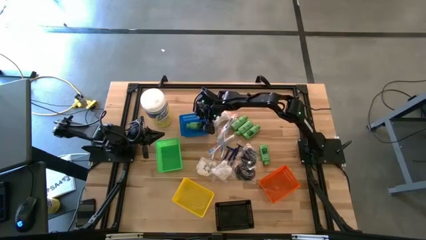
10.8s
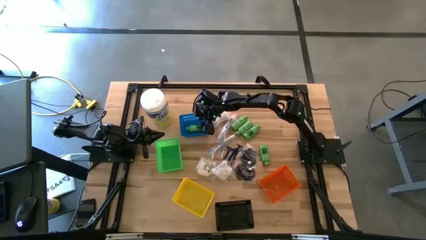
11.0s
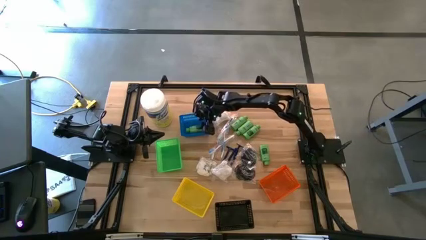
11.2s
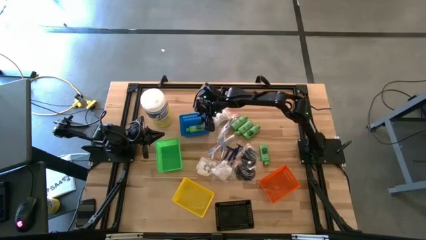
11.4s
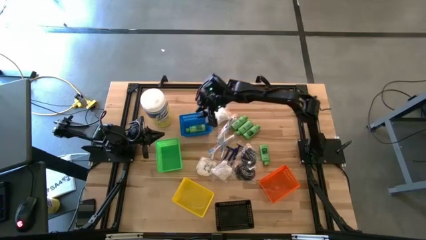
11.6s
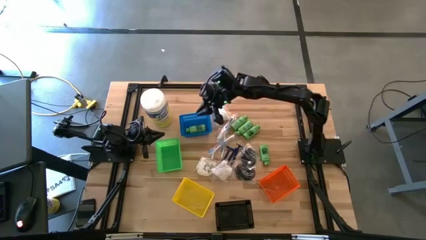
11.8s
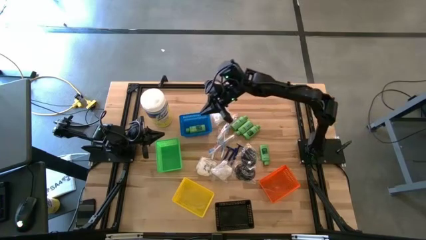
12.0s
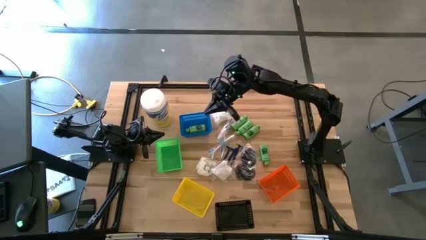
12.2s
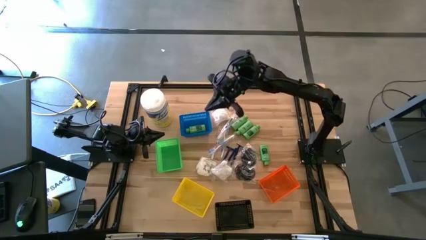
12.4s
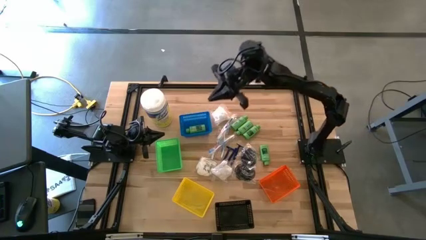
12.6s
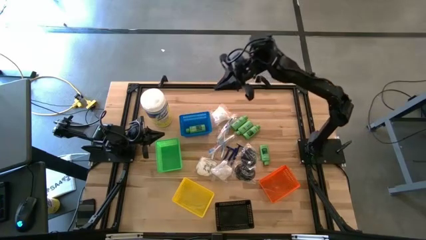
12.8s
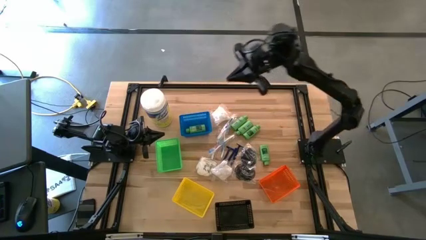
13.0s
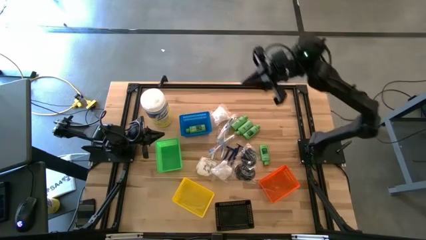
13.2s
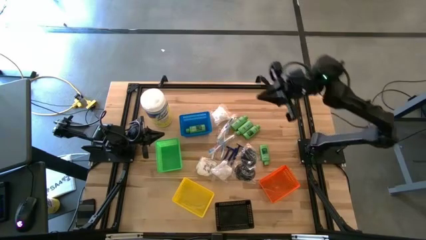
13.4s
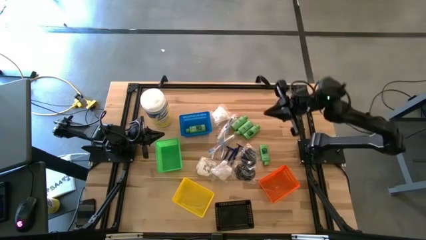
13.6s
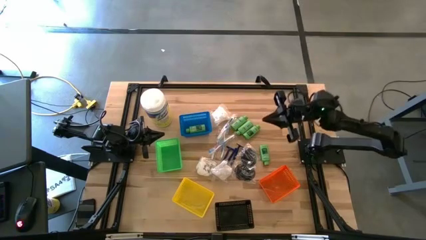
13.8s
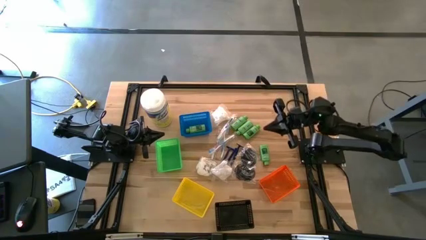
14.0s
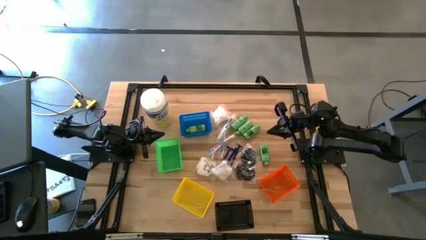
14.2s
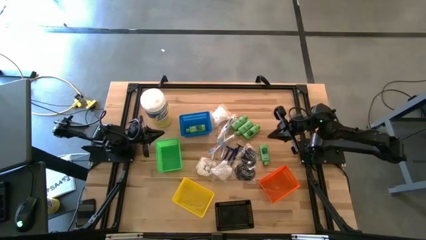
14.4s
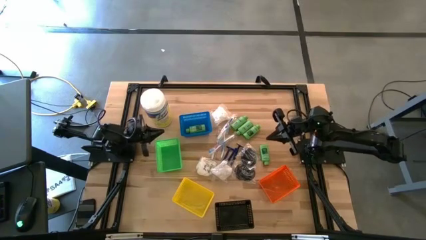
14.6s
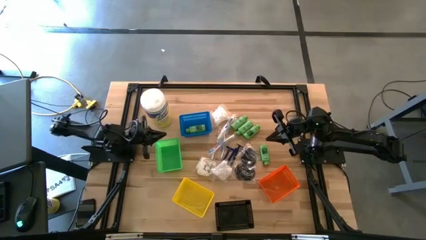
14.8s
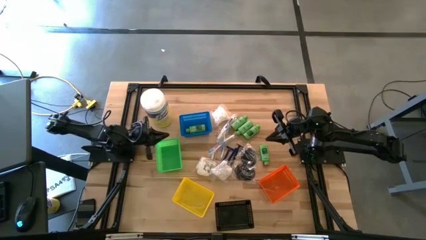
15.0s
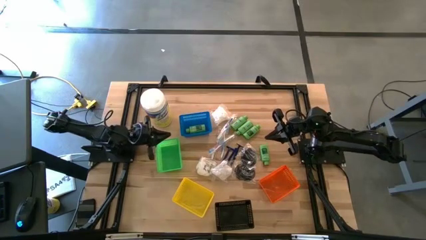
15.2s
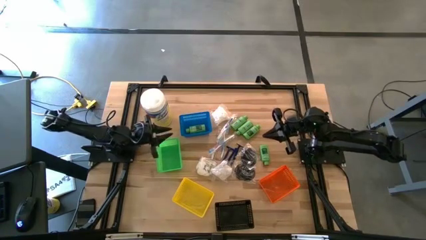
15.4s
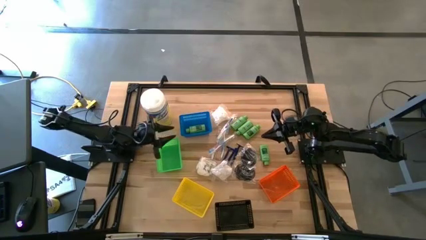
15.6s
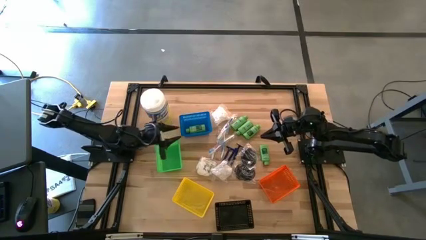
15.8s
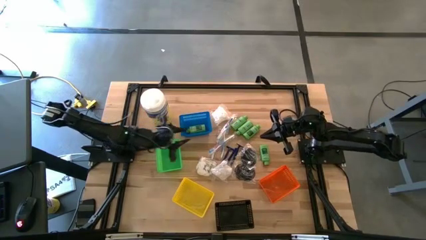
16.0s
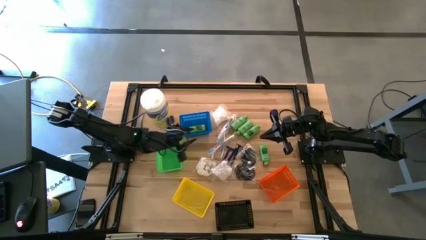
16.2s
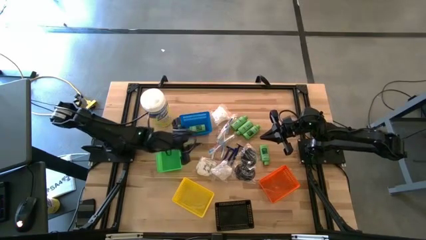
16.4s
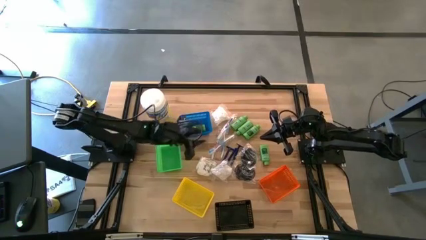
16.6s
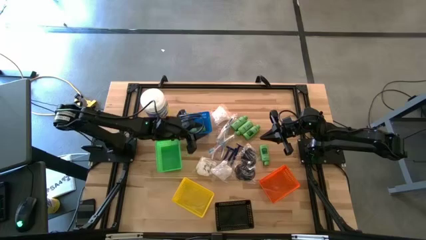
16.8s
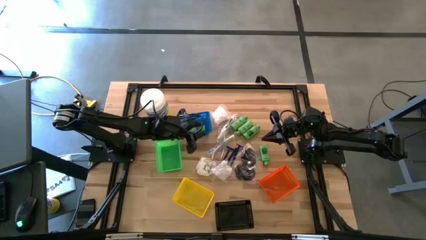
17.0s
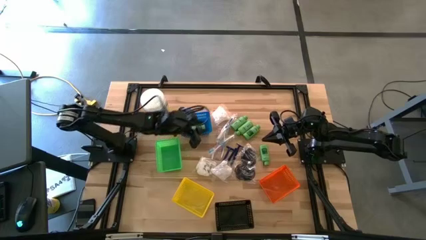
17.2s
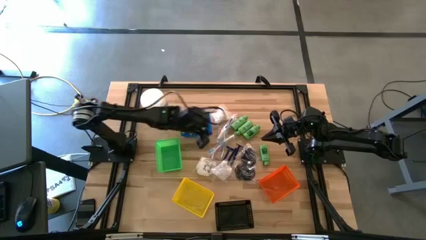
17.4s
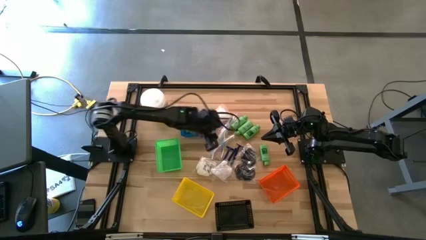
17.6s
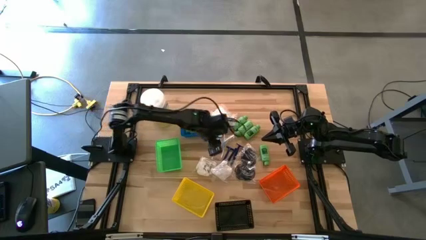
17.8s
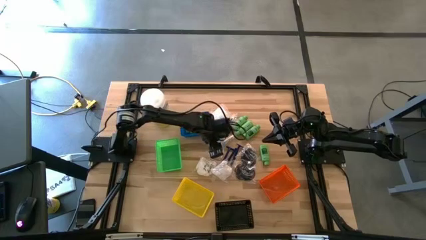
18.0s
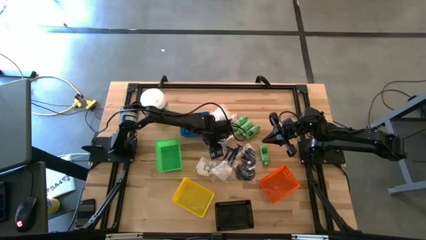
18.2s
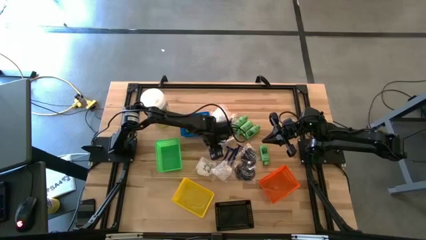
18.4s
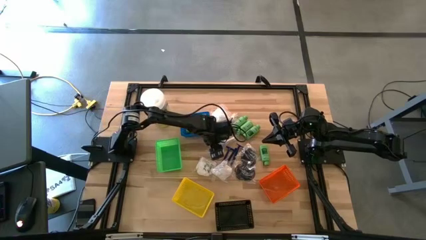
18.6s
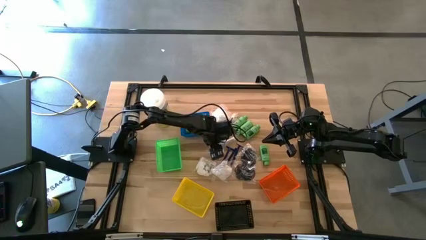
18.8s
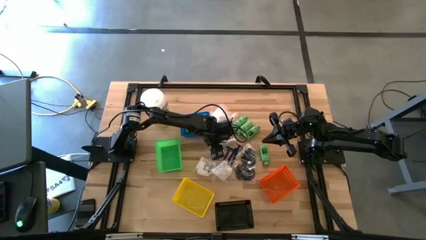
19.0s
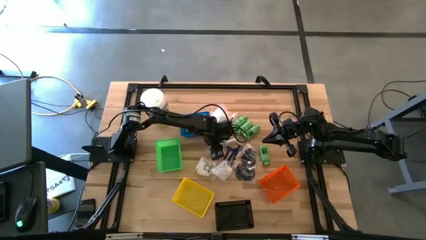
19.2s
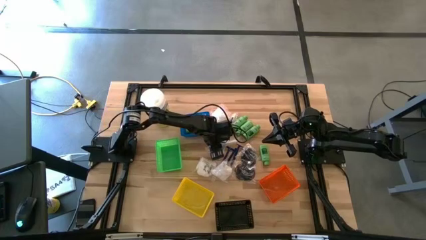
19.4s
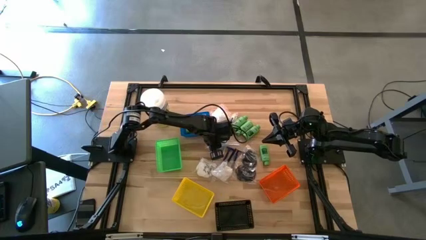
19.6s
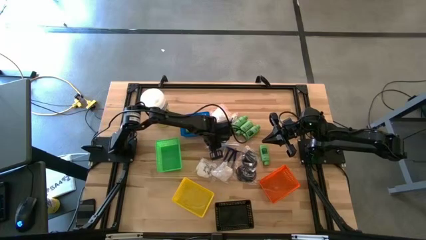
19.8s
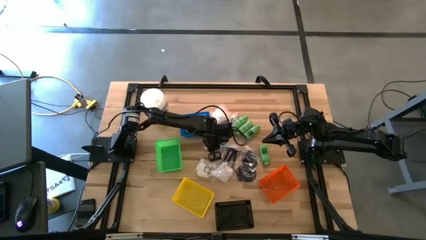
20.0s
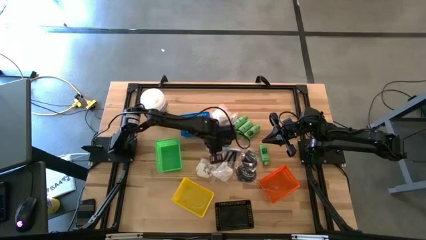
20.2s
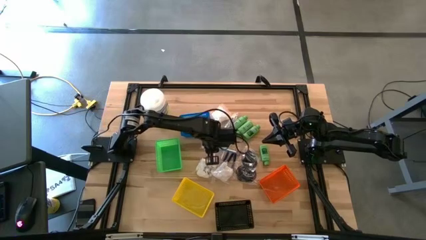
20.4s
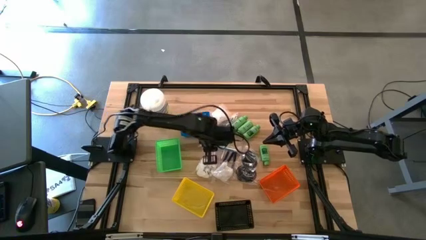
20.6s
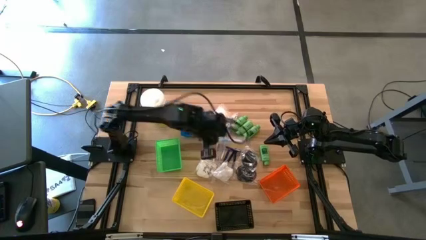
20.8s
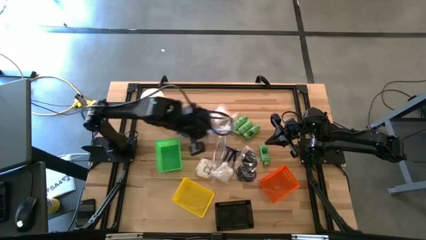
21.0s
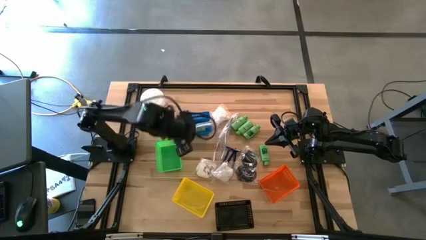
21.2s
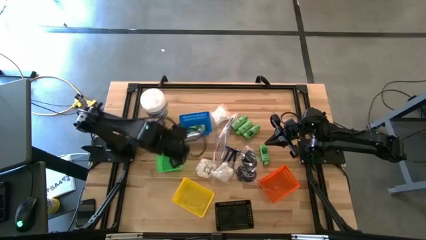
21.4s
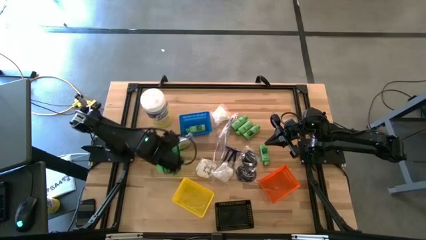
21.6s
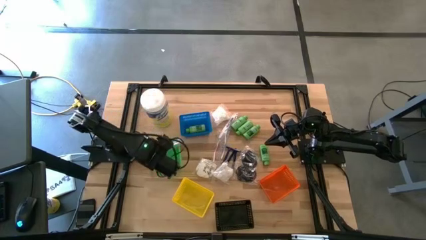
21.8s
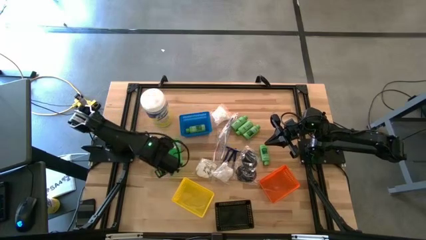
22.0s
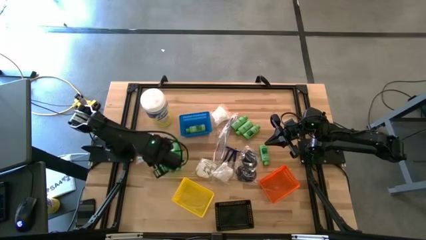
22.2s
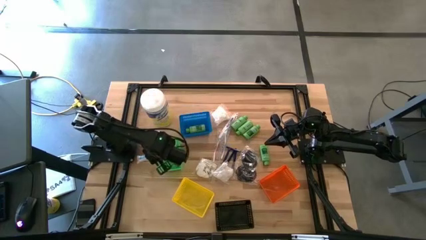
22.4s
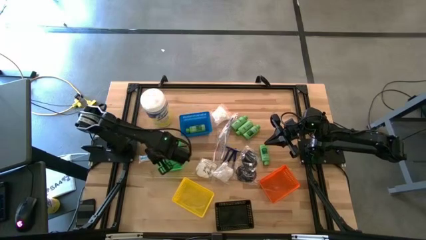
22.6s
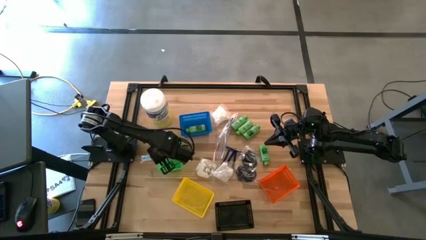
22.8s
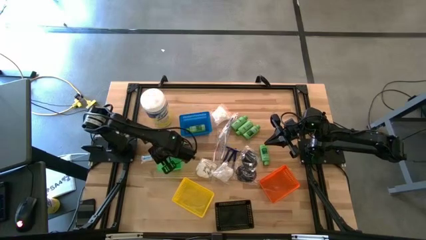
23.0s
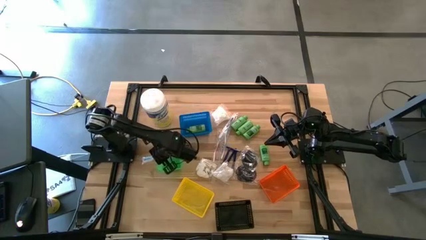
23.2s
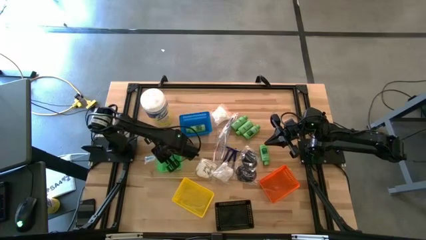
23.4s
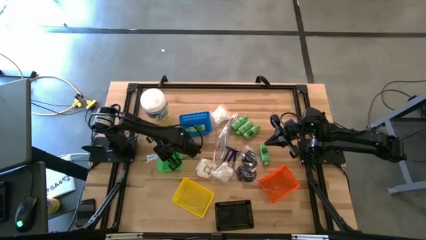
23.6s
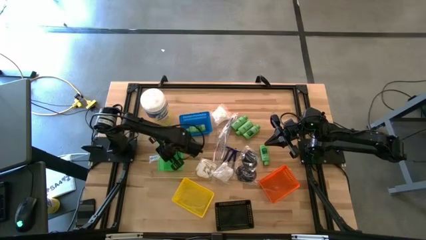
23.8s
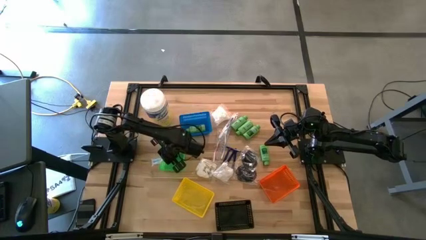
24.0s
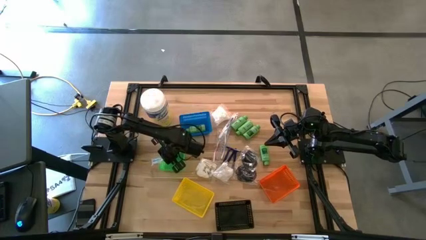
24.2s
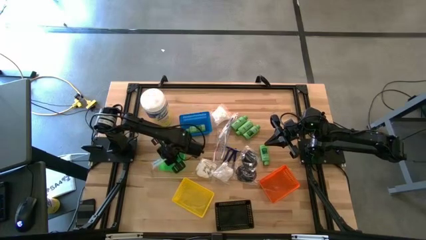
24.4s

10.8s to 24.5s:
Task: Pick & Place Travel size toiletries
Put the blue toothbrush into the green bin
